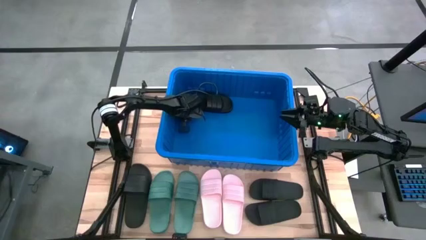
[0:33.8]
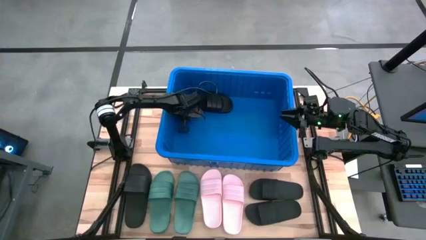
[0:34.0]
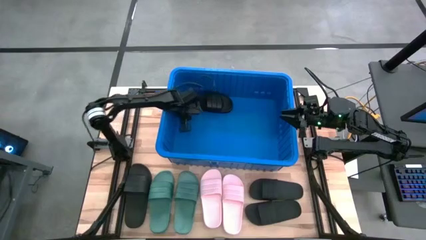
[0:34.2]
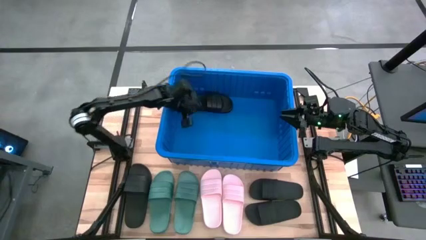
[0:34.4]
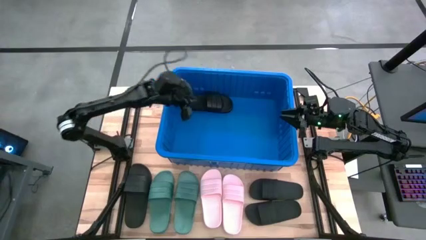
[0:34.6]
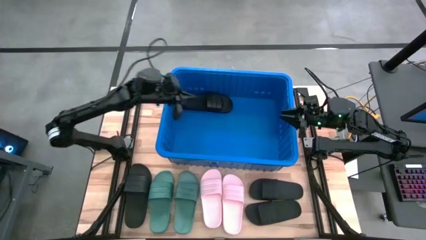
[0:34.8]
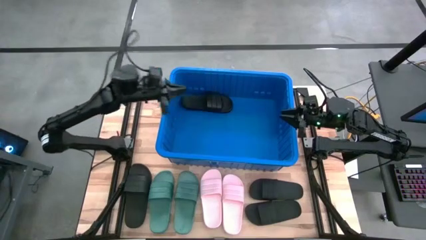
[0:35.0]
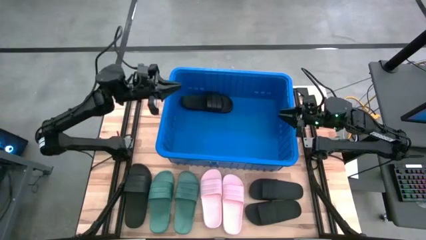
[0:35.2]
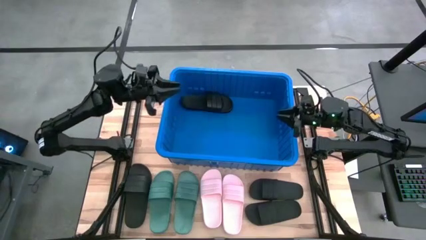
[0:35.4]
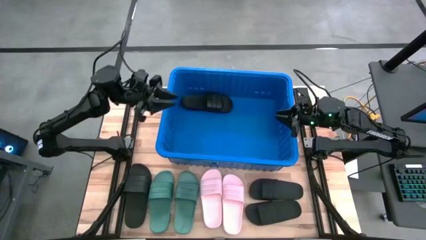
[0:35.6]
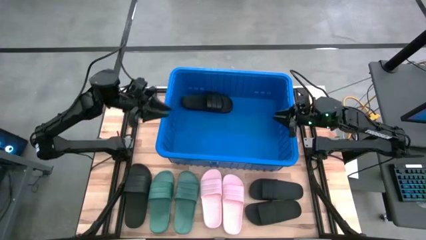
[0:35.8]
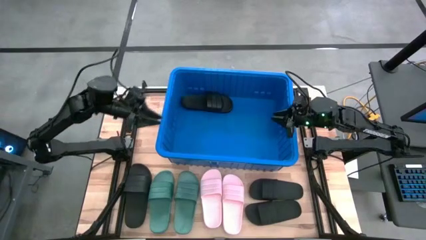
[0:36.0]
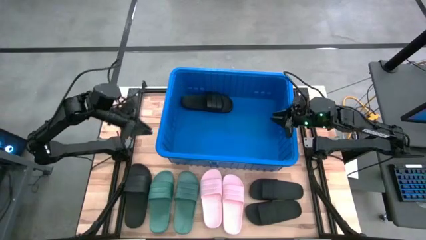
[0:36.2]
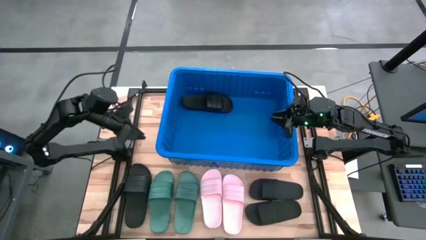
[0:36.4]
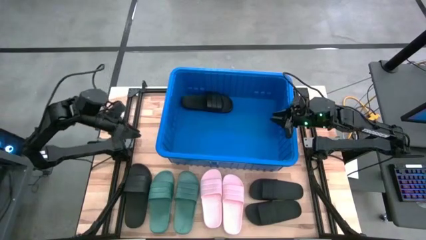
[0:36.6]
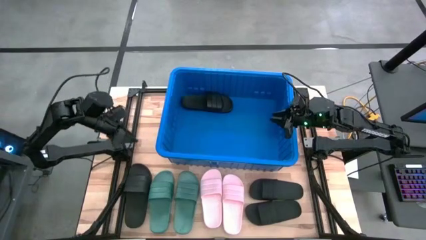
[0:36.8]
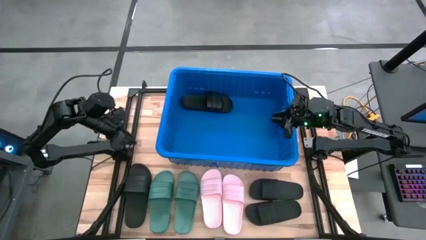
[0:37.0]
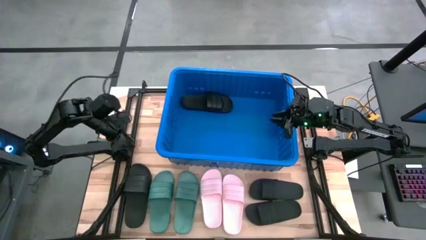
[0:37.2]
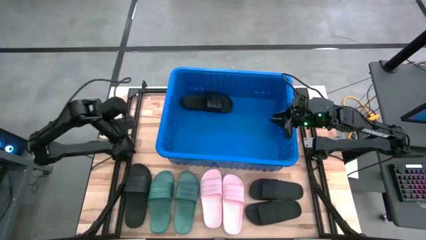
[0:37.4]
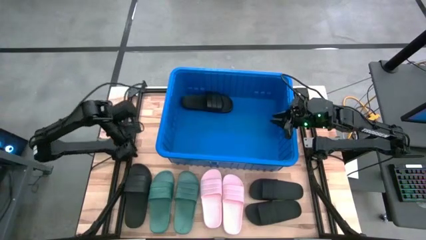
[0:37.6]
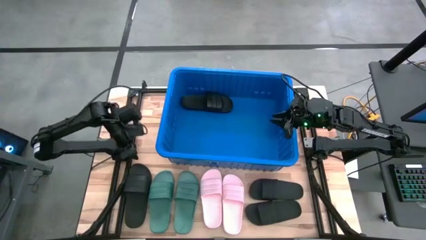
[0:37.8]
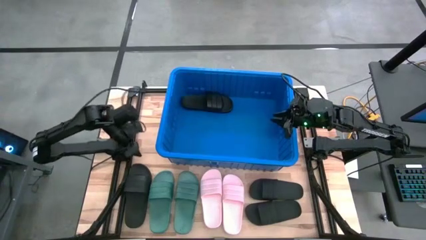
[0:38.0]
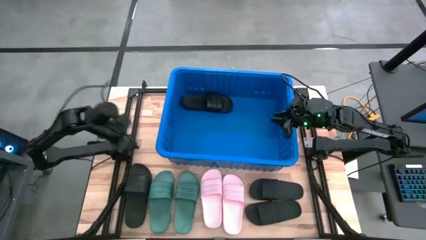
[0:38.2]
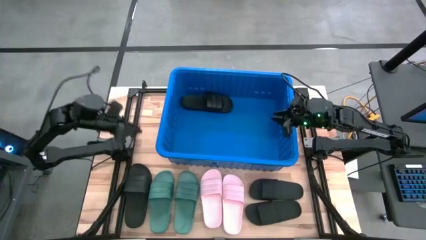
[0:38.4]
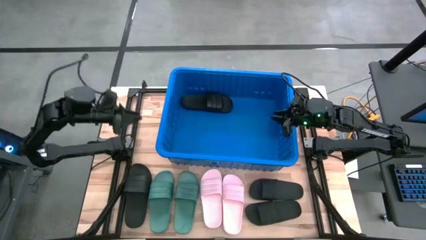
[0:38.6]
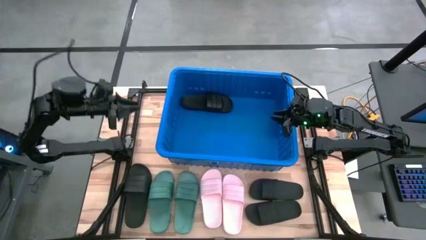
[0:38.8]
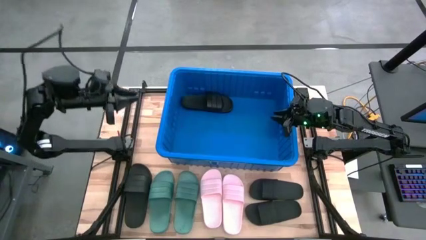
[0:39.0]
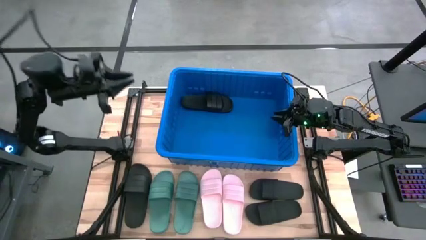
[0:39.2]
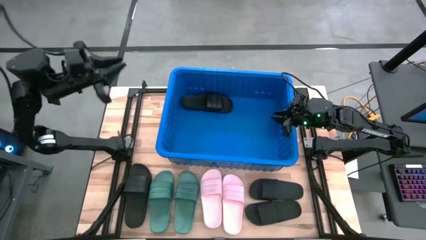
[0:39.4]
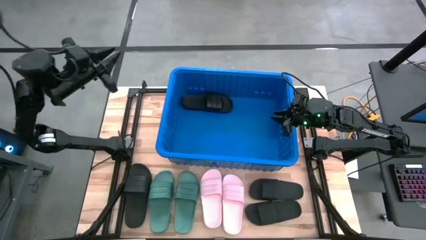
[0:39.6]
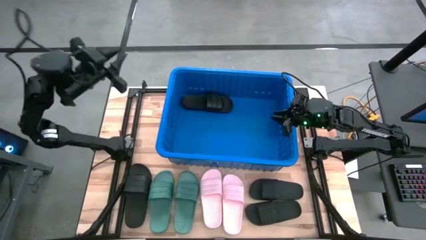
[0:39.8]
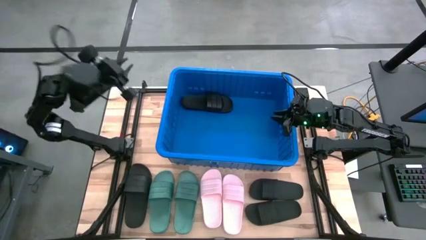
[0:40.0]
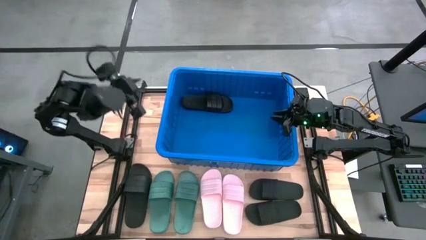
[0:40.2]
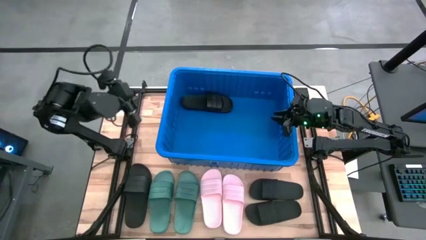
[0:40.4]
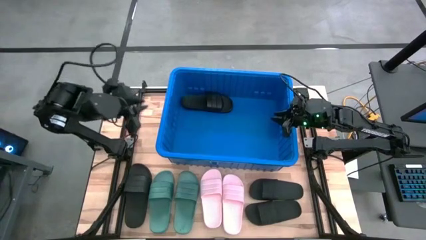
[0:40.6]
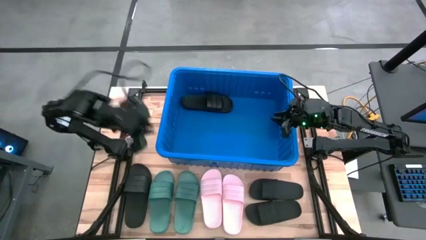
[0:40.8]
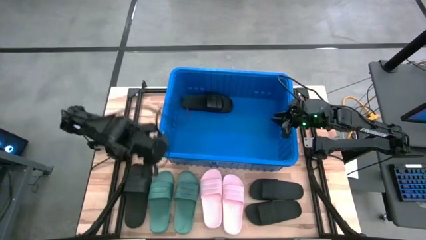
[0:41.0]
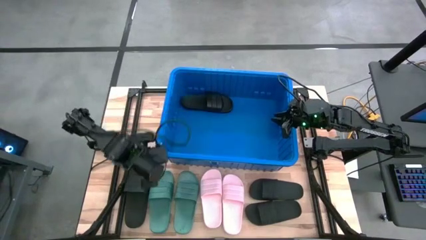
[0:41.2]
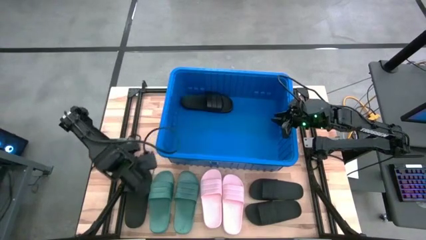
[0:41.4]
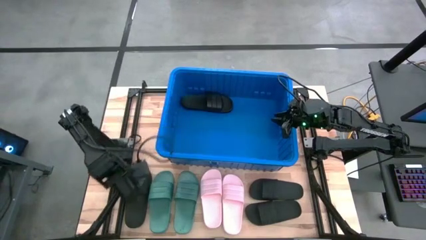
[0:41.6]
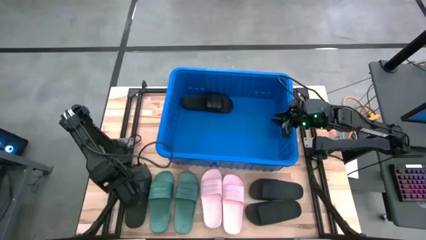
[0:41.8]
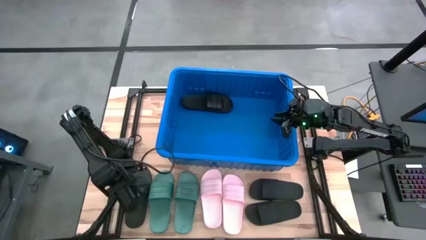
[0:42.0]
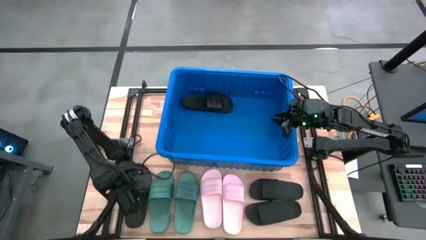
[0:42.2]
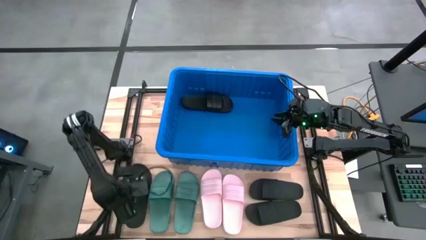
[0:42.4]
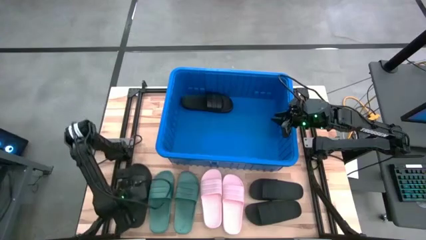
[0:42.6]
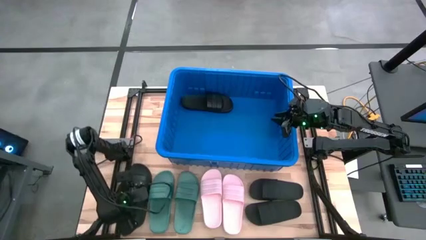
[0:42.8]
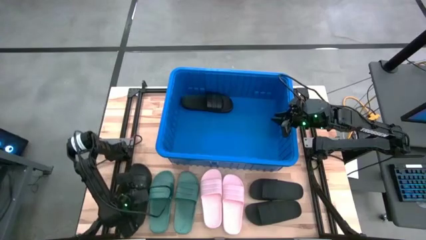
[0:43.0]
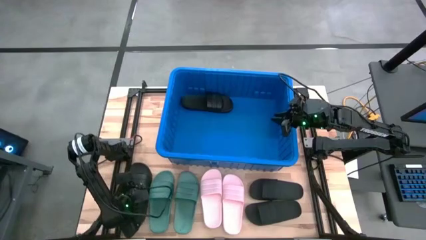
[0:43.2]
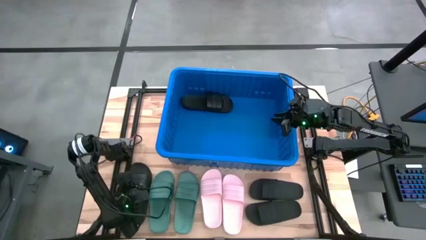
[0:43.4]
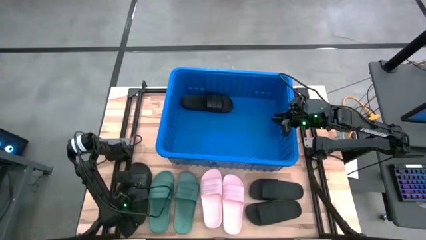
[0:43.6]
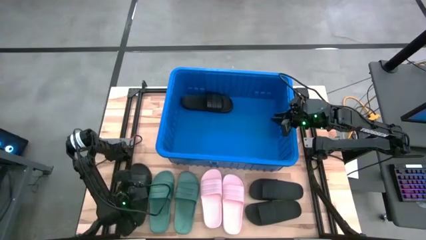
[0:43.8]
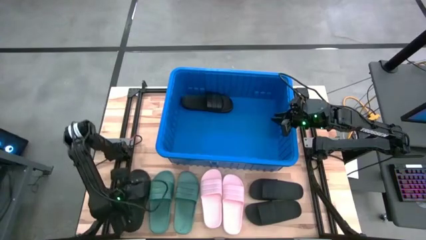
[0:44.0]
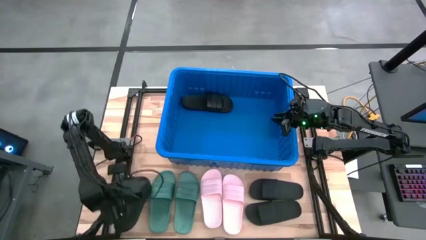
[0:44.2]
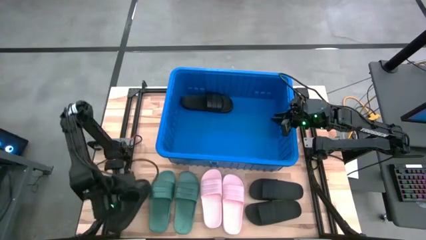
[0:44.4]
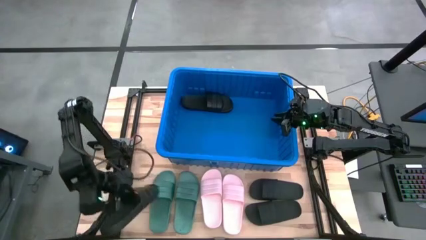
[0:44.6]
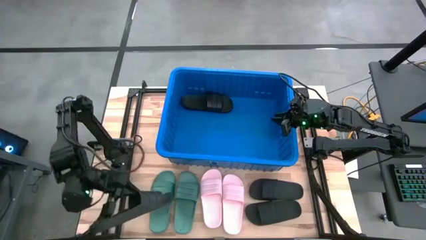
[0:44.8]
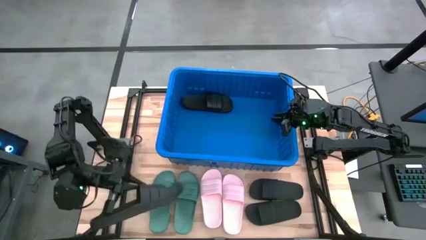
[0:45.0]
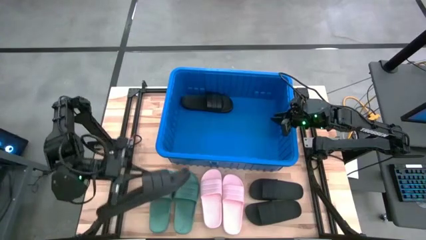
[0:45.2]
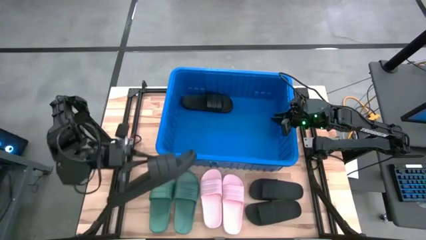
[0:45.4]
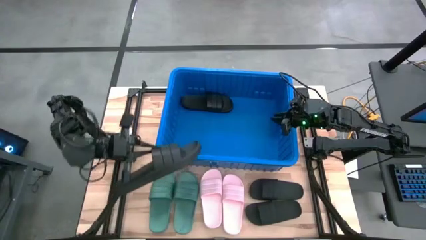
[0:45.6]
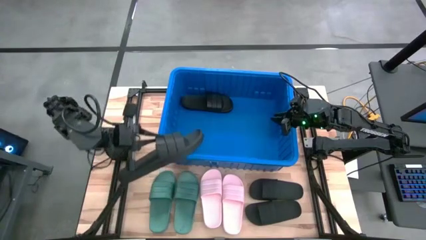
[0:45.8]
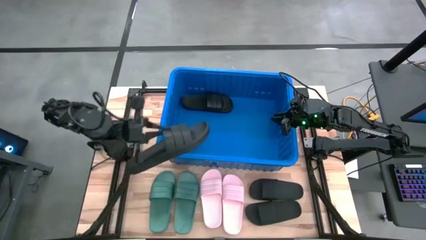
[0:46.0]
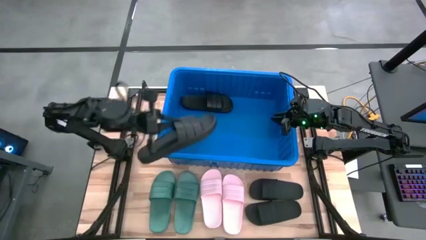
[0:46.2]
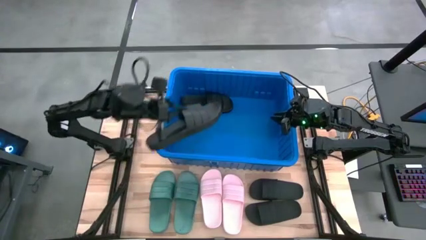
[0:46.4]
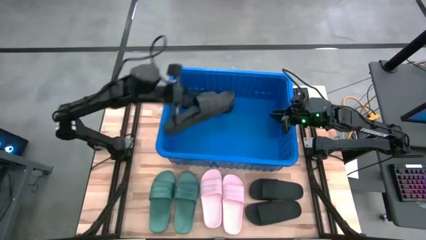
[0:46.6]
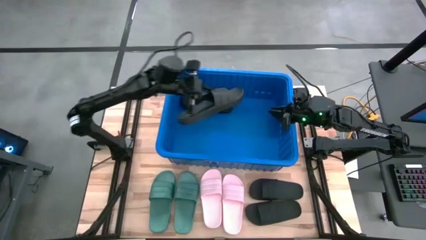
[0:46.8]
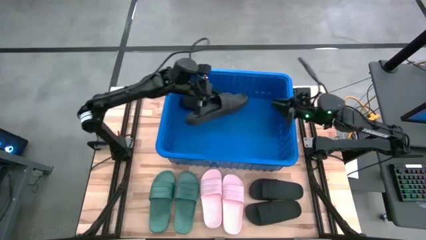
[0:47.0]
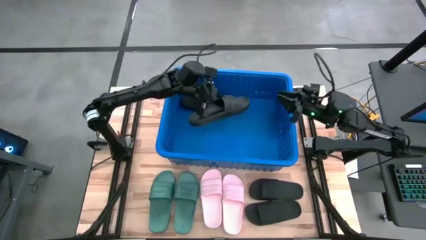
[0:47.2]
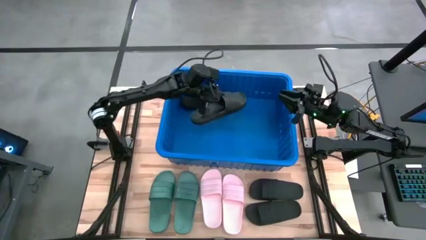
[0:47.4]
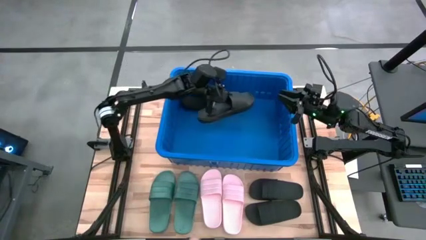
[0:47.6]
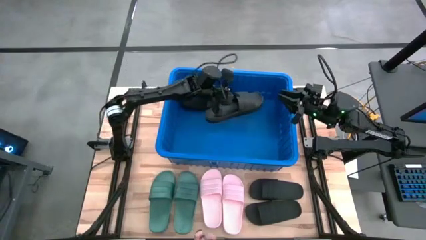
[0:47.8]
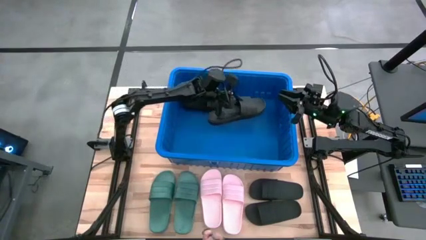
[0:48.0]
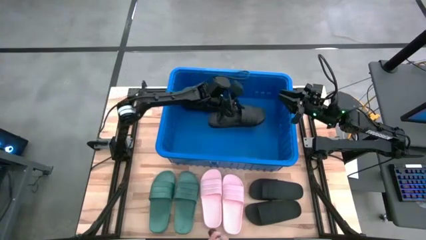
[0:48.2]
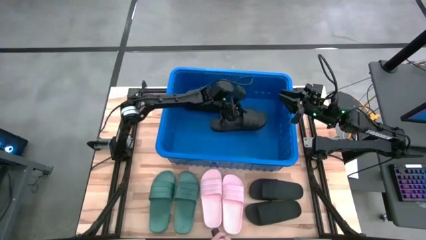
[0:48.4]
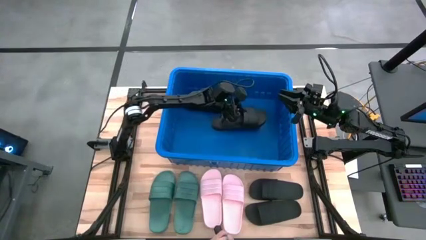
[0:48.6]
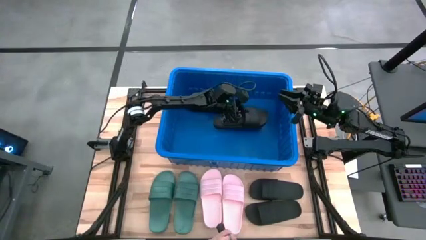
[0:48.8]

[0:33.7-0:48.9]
Task: Pick and place slides into bin
Stack the black slipper on top of the black slipper in the blue bin
